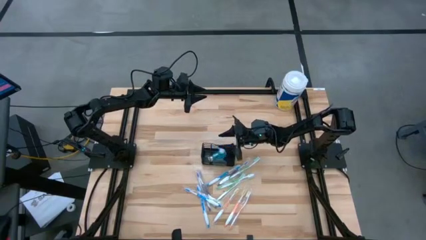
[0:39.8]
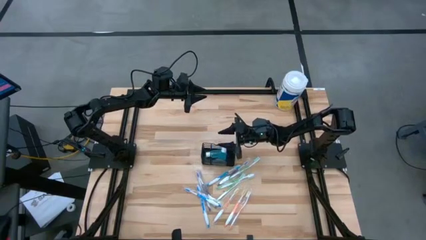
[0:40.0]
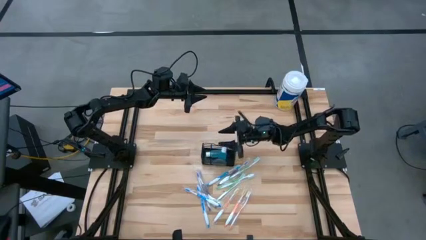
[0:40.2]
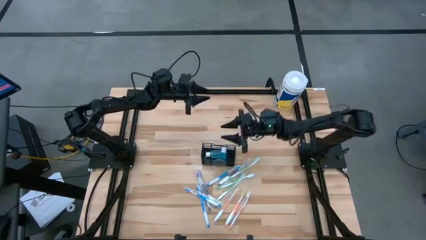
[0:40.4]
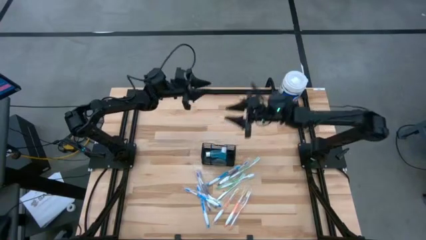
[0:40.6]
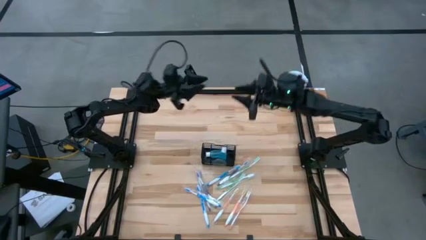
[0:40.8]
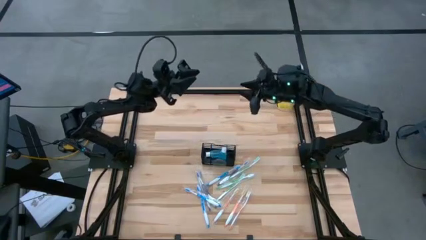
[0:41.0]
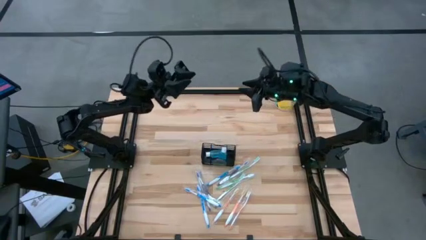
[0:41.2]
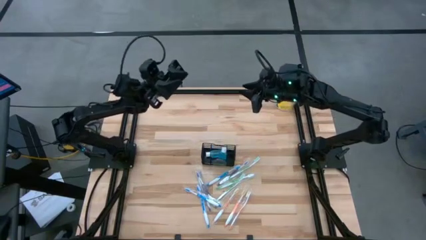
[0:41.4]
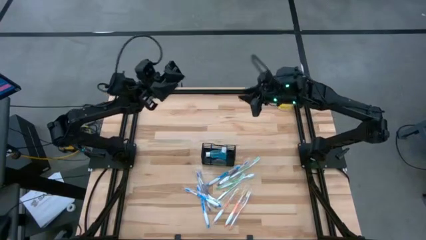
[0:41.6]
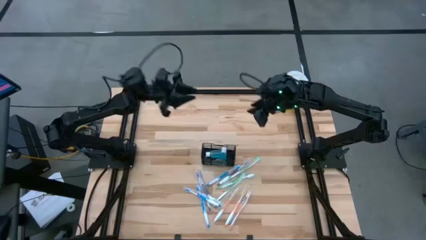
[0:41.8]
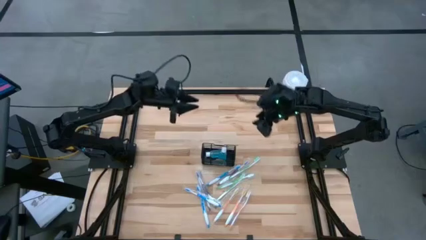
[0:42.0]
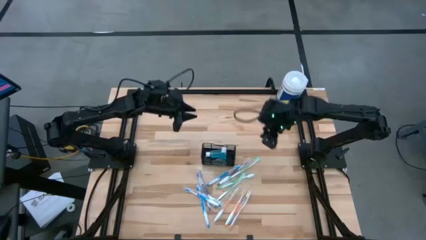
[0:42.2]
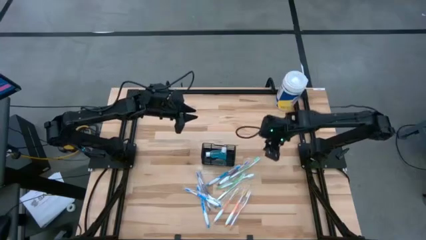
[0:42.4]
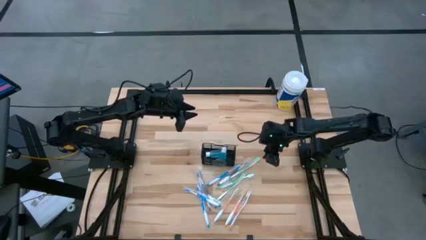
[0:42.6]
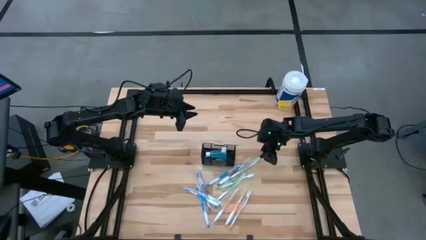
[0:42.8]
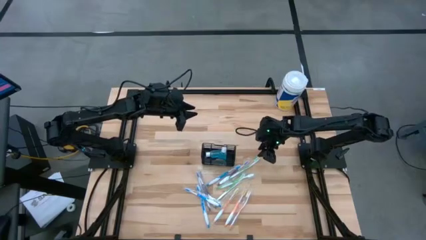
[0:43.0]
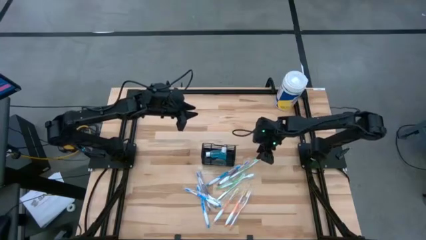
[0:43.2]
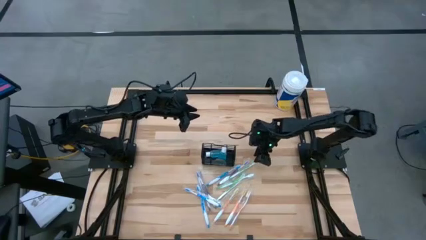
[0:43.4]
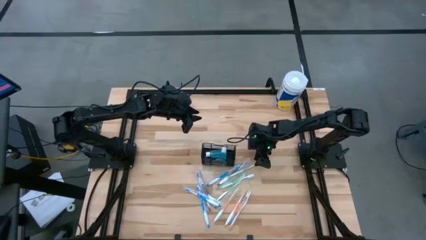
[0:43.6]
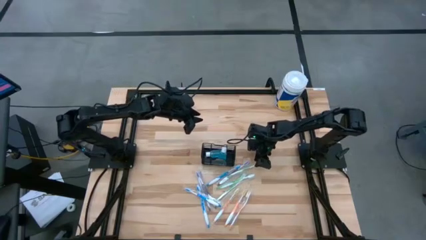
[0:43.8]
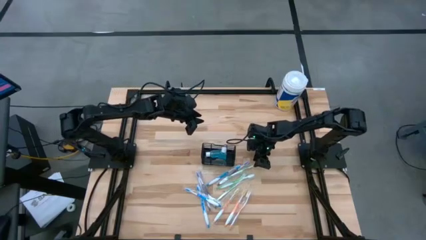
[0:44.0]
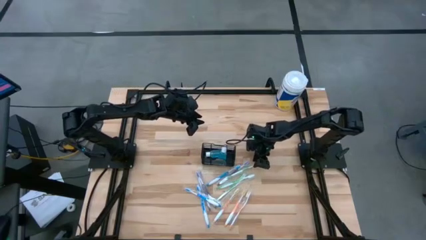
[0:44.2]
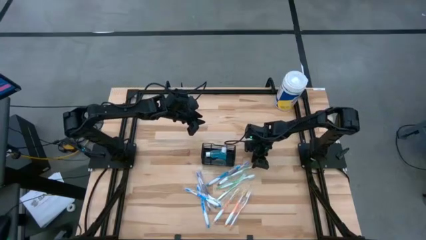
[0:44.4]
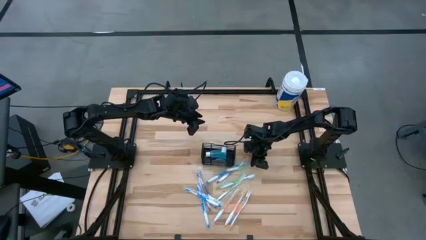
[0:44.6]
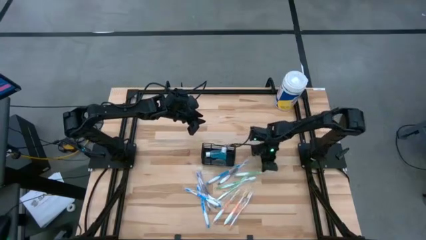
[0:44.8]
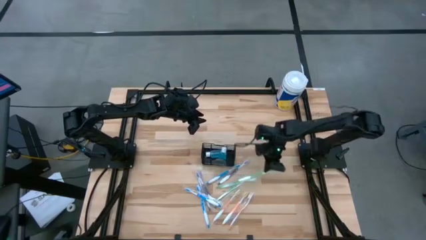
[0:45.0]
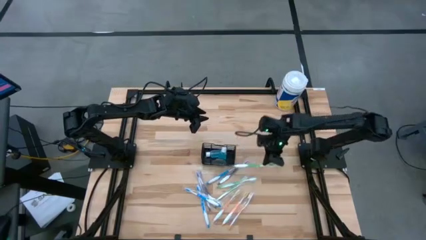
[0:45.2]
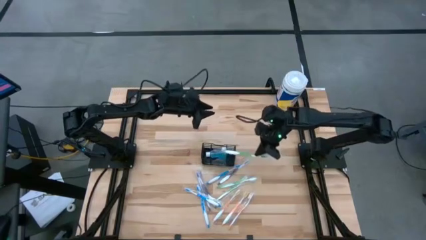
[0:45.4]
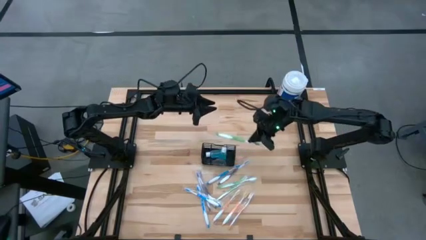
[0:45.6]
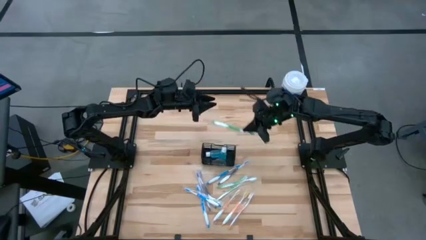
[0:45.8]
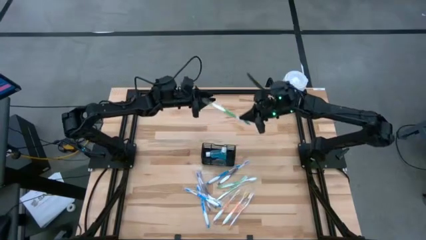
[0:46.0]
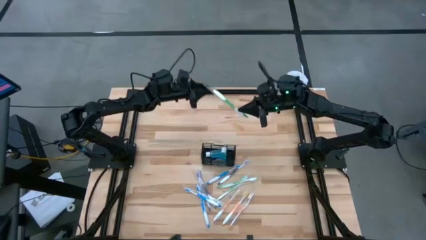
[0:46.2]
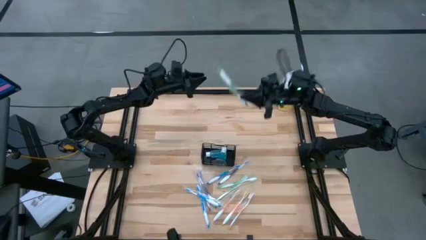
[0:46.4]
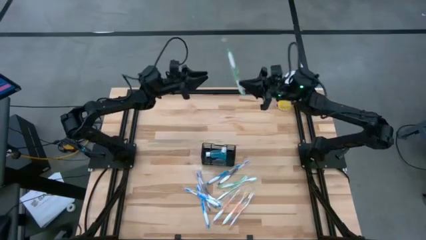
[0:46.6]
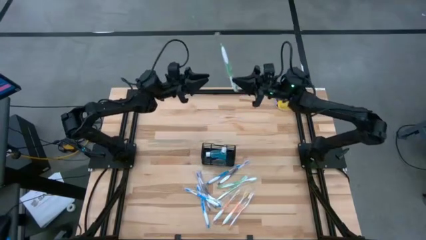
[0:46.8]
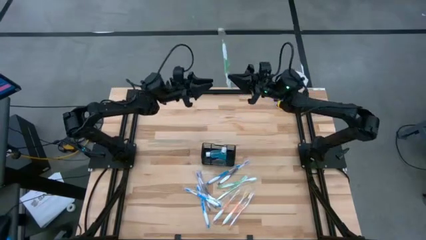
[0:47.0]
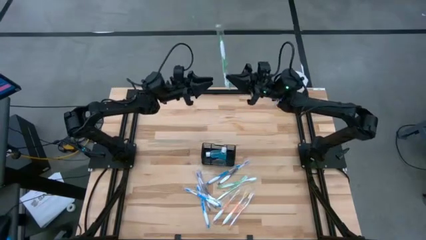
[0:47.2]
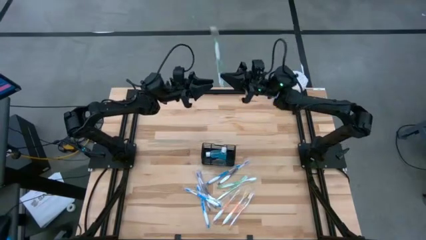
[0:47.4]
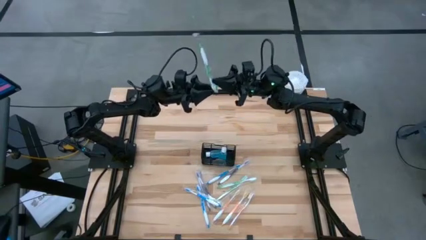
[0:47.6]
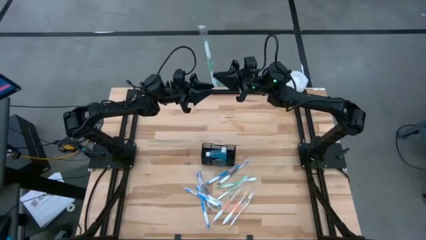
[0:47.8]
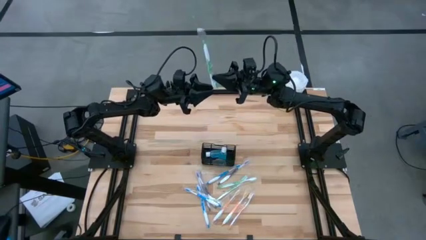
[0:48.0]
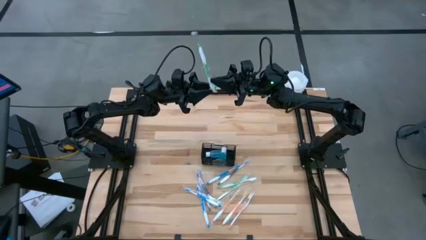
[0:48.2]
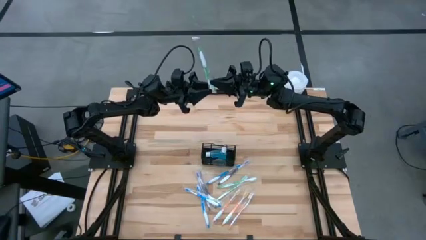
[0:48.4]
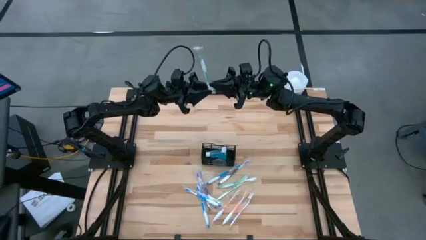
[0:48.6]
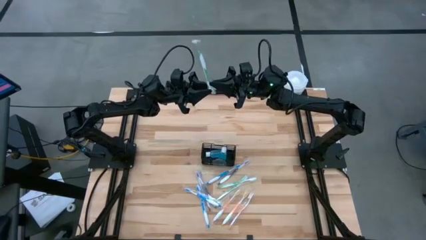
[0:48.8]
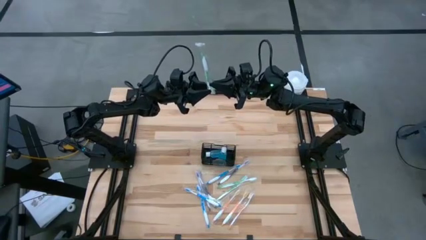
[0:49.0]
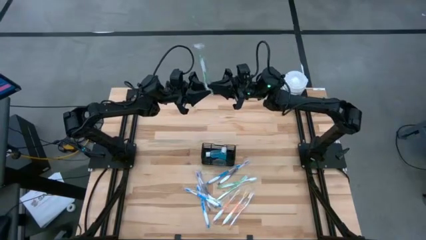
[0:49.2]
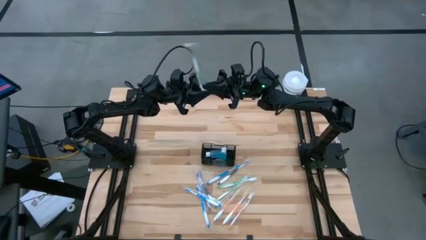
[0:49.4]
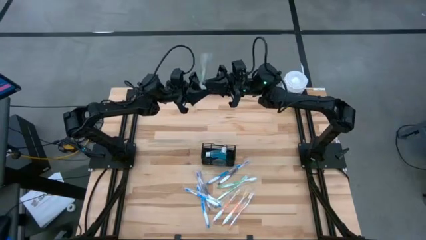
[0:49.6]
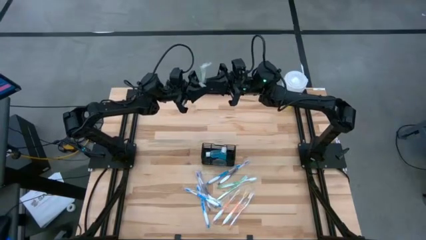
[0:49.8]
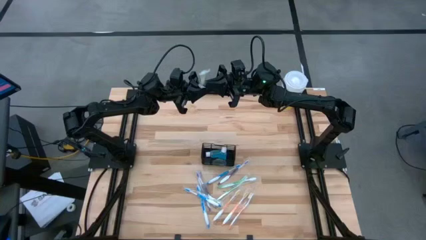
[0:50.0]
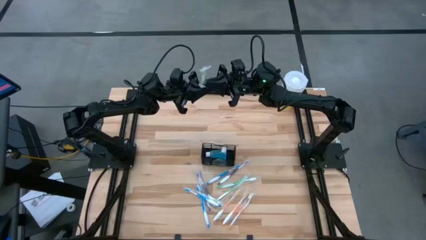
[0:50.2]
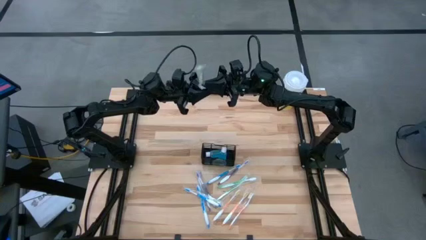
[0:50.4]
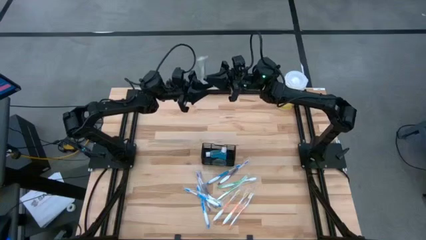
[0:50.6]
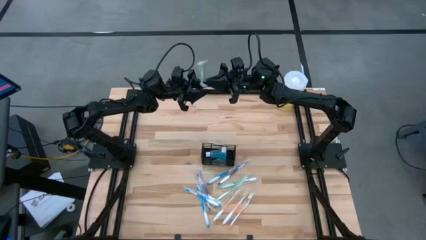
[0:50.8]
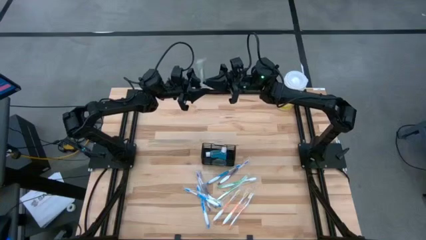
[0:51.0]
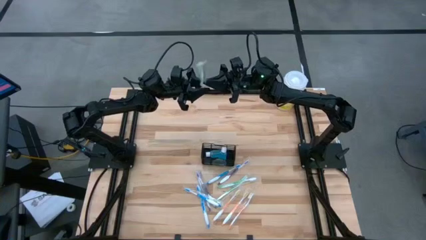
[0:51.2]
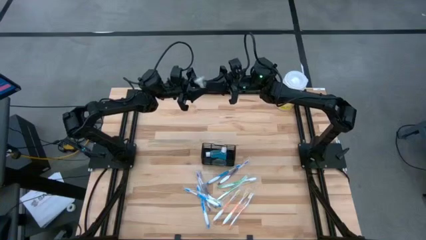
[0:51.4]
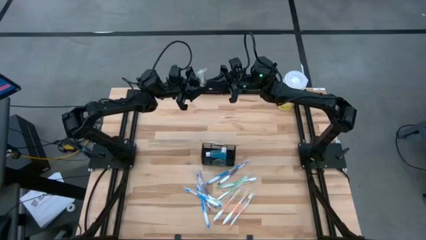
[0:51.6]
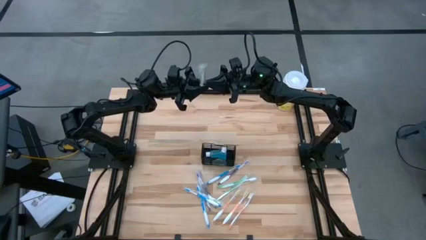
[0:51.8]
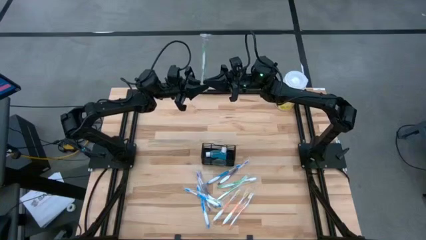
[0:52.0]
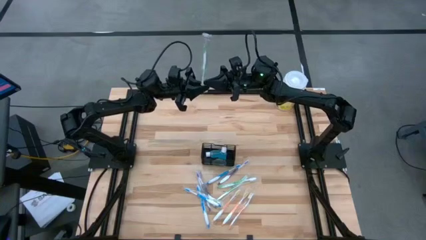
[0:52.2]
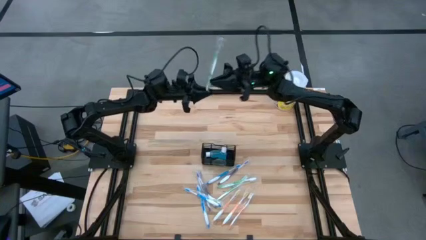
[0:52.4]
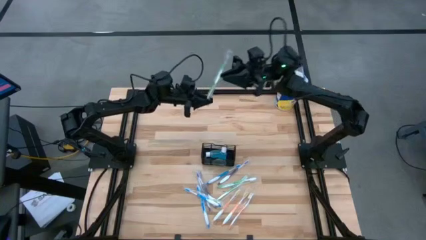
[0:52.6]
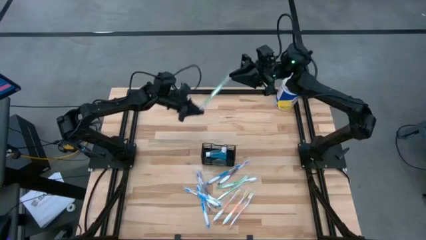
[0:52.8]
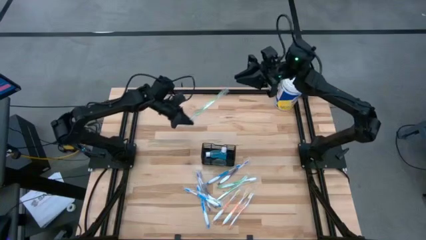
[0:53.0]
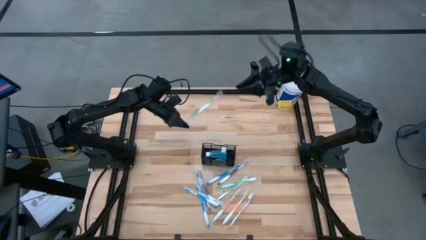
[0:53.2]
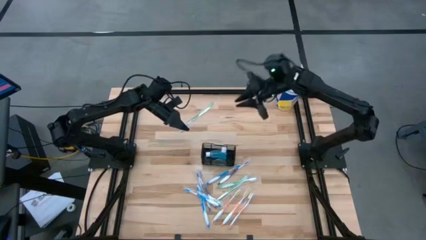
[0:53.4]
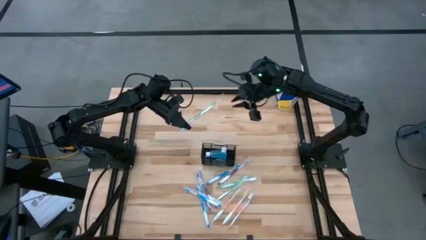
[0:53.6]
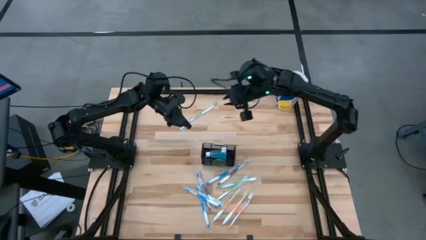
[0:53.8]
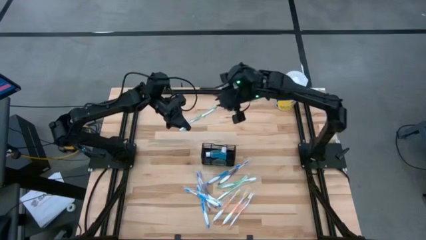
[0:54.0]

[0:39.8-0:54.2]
Task: Pick & Place toothbrushing station
Put the green toothbrush into the black wire organizer

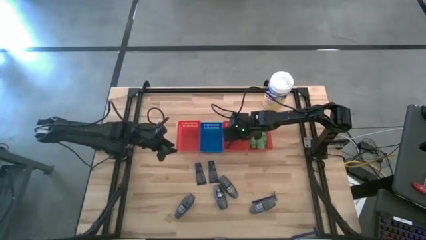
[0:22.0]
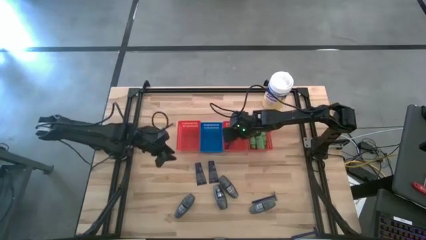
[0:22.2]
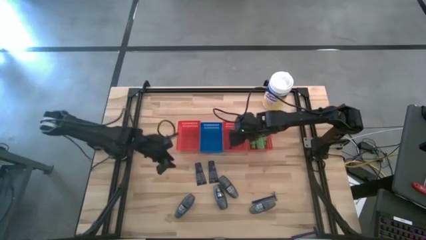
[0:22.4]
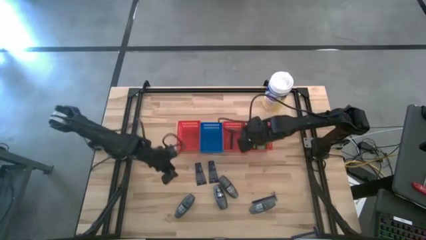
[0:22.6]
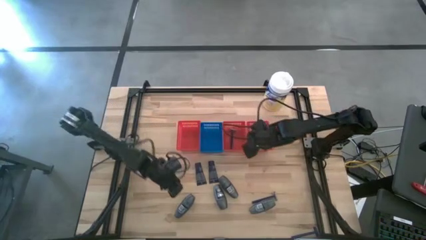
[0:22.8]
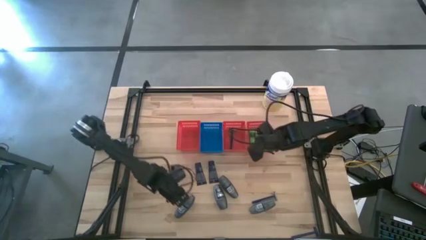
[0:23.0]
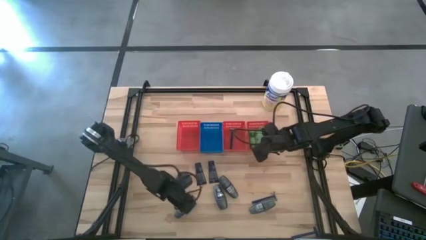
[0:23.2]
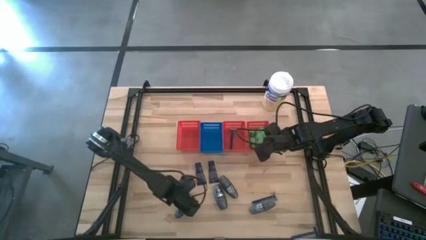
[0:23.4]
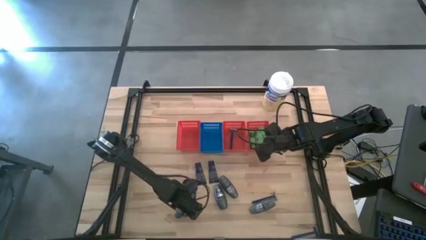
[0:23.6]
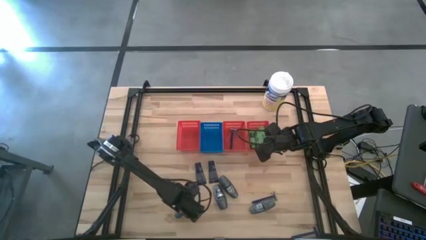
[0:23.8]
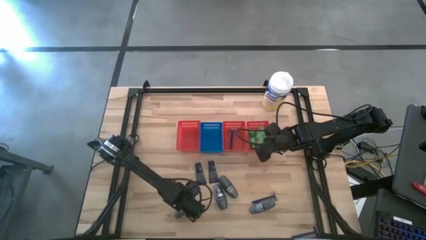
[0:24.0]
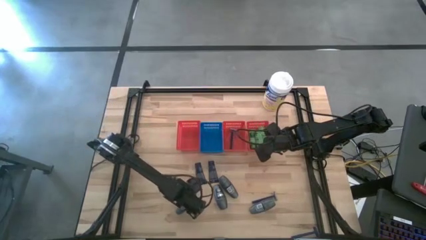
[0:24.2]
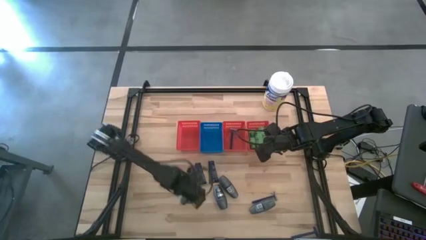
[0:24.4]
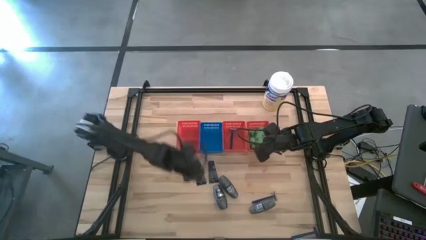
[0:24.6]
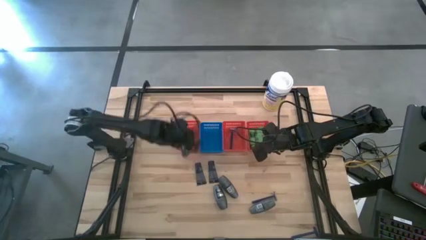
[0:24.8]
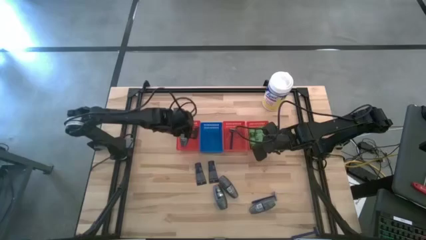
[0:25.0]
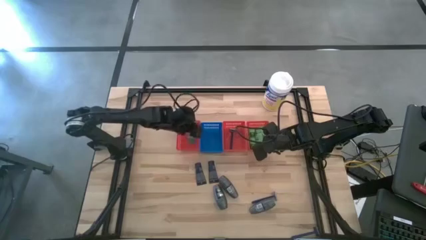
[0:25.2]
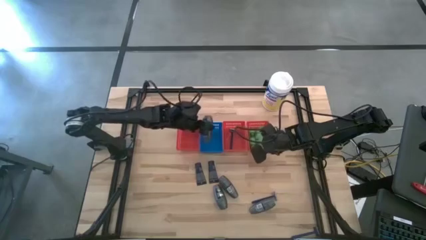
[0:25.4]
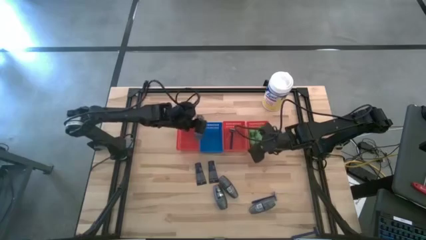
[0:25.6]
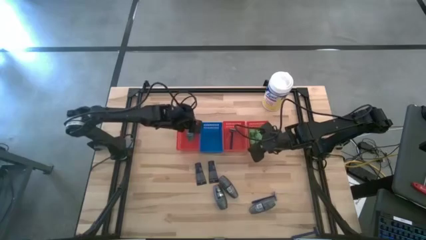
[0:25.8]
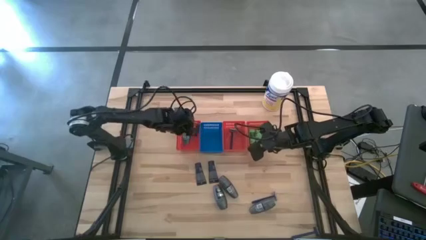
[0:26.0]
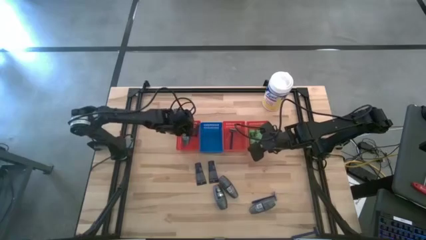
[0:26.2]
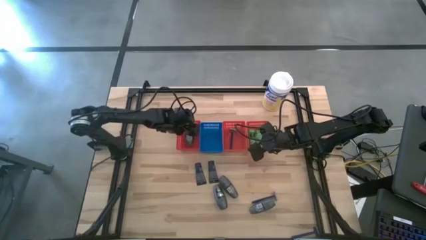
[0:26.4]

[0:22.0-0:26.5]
Task: Pick & Place Travel size toiletries
Put the black deodorant into the left red basket
